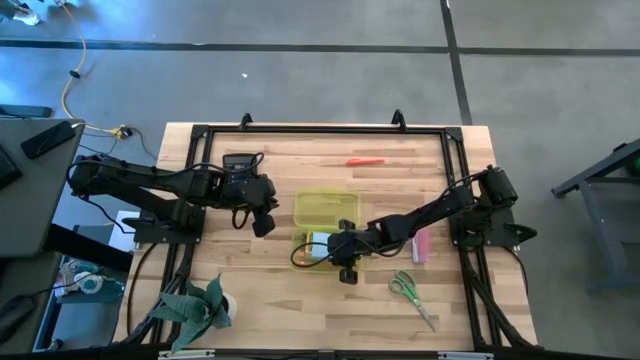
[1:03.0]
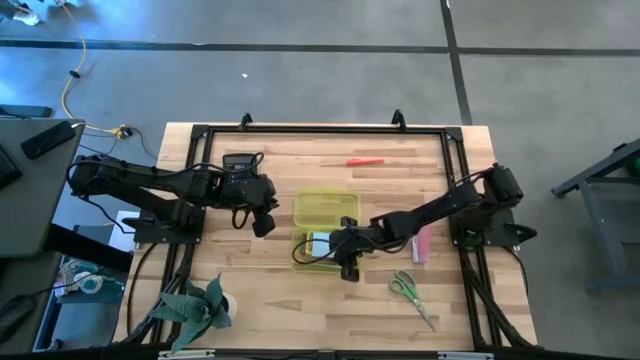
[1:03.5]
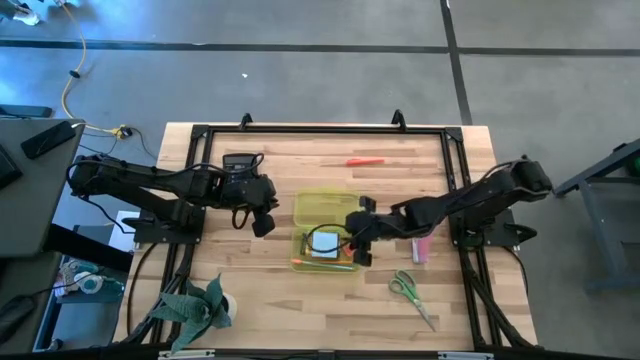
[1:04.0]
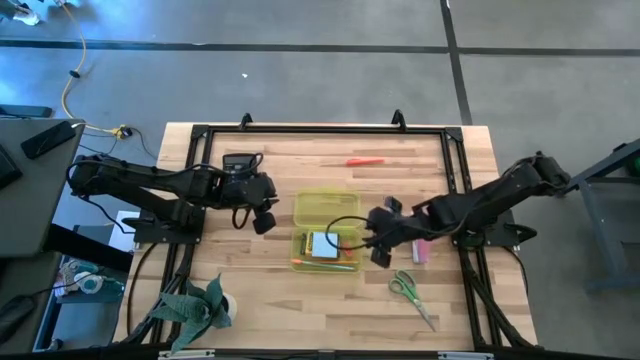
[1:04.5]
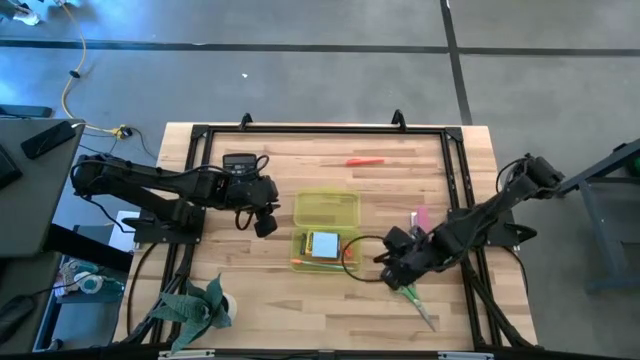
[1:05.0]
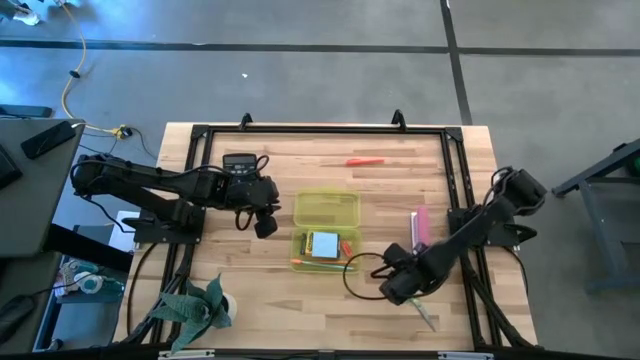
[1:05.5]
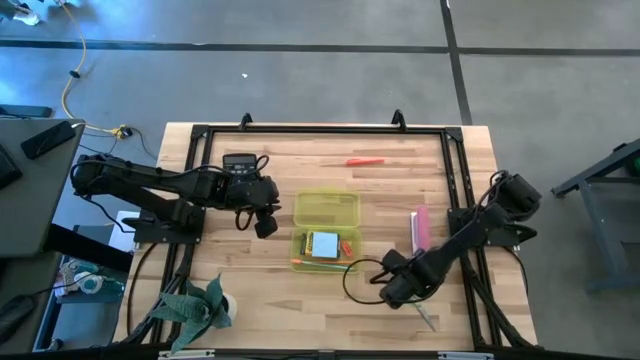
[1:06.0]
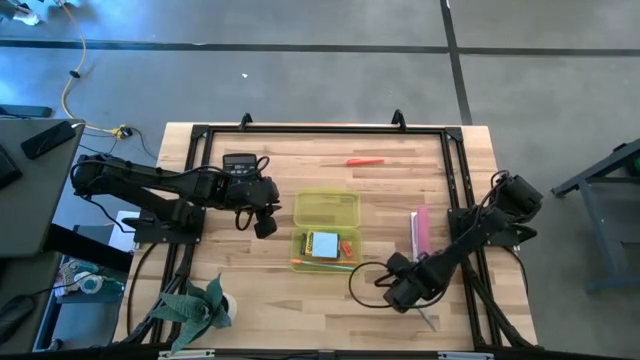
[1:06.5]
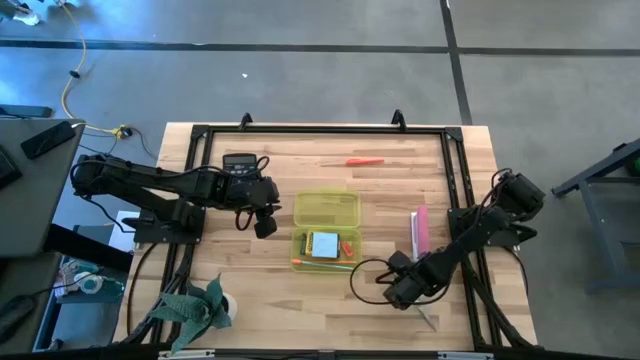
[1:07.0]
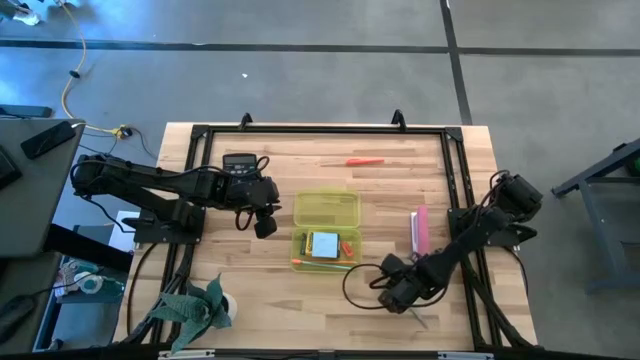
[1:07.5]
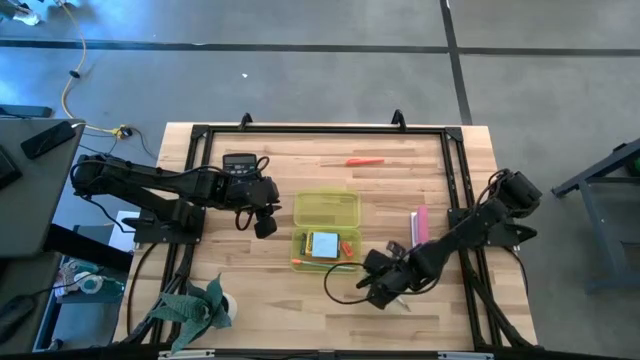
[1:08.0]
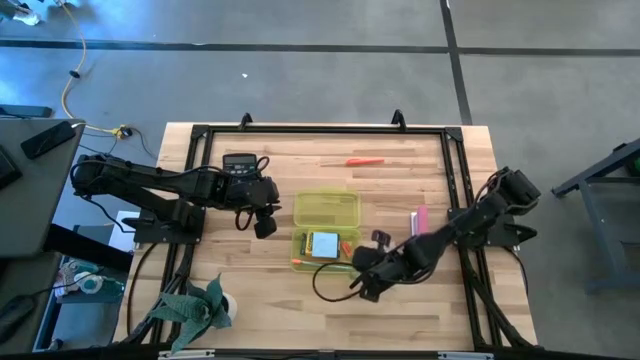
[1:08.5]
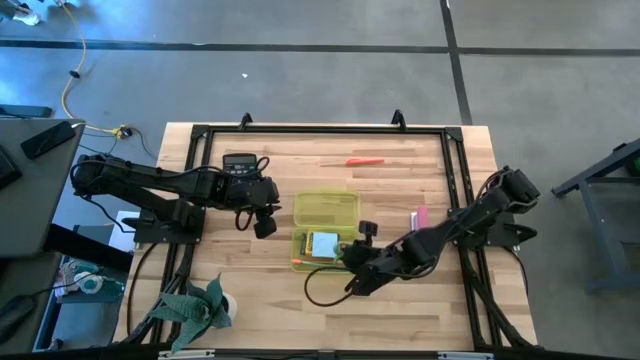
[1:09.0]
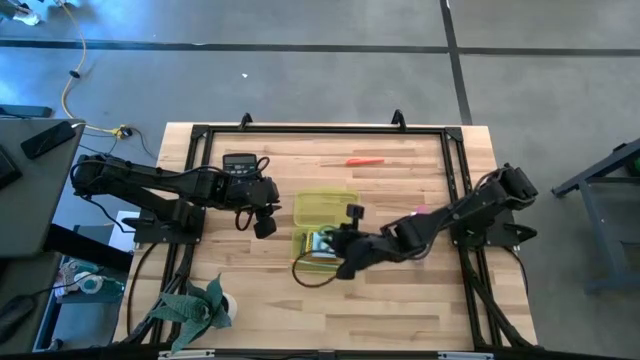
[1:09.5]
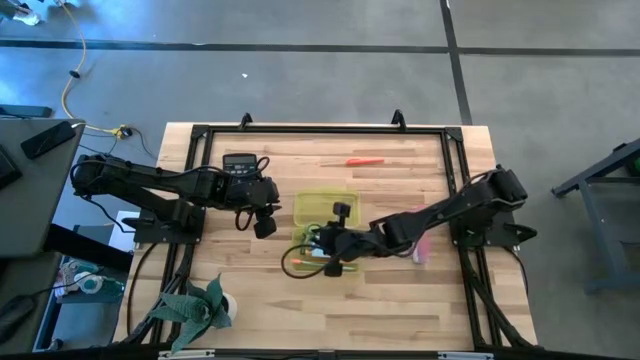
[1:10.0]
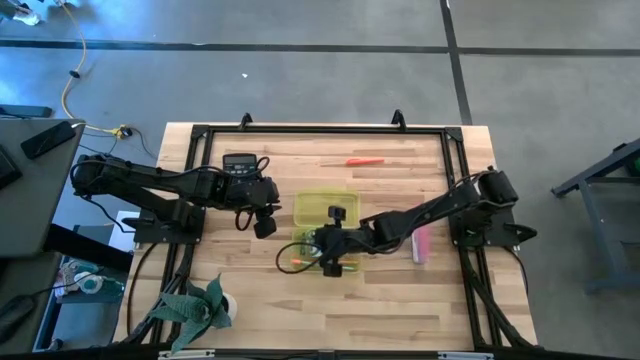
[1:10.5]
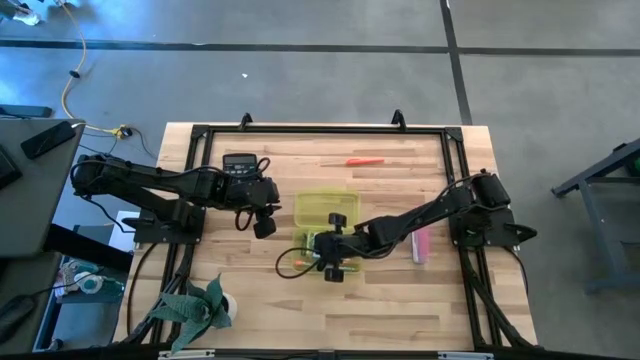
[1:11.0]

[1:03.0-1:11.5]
Task: Pack school essentials
Put the green scissors into the yellow supply box

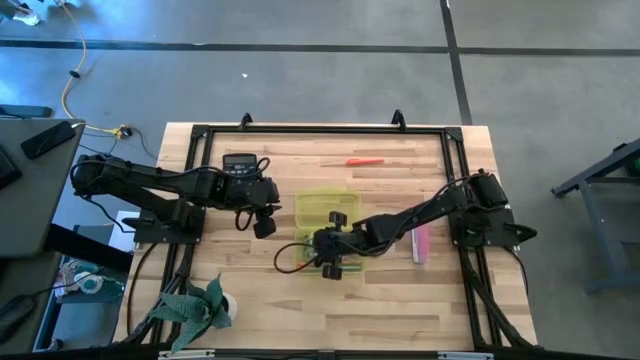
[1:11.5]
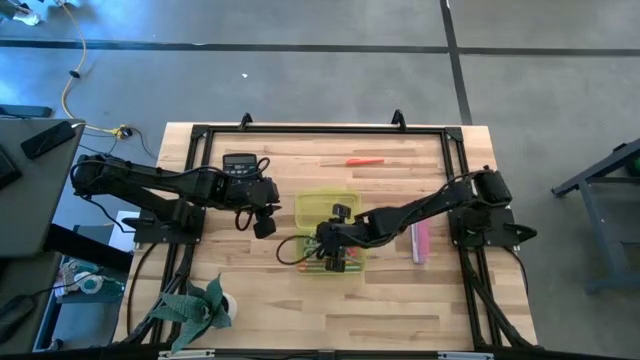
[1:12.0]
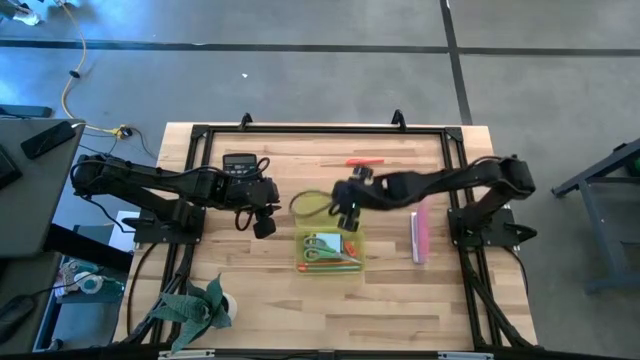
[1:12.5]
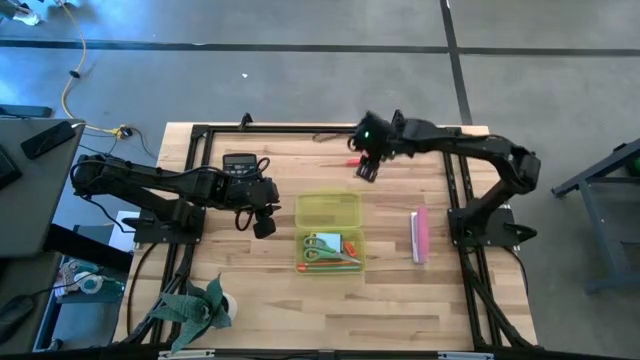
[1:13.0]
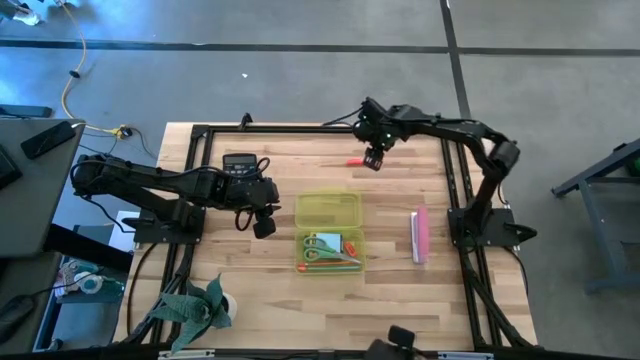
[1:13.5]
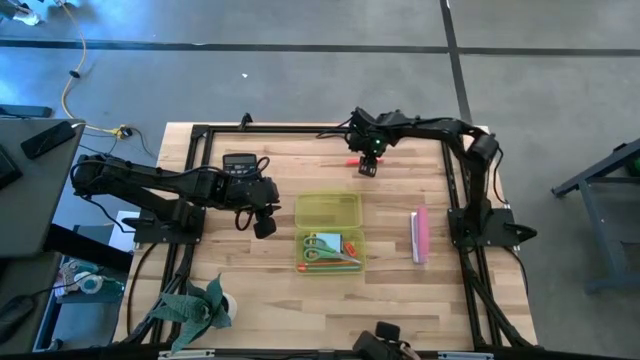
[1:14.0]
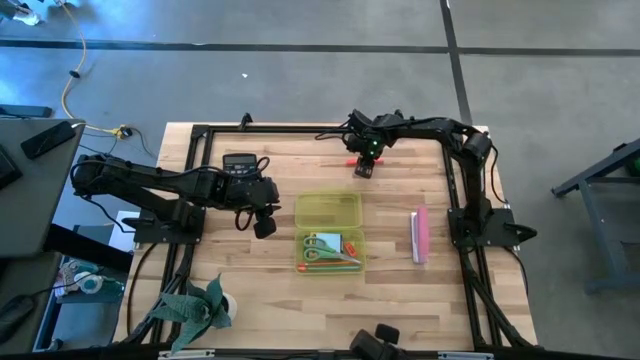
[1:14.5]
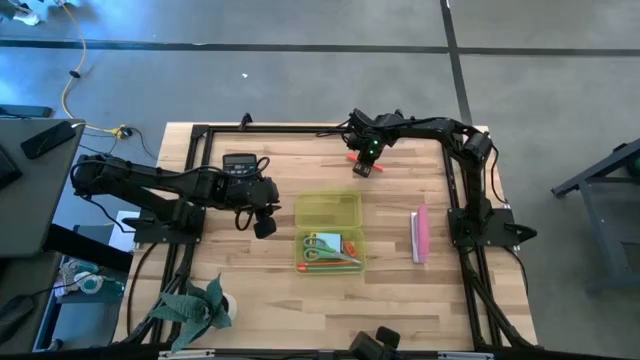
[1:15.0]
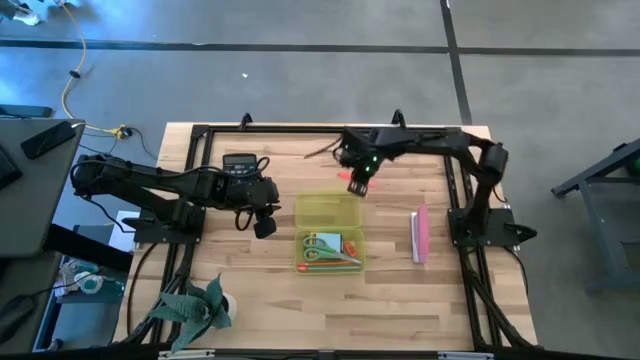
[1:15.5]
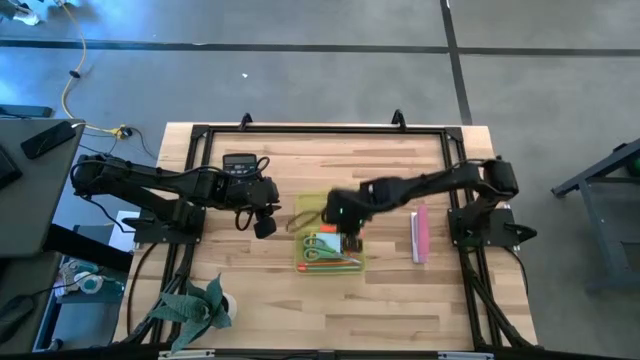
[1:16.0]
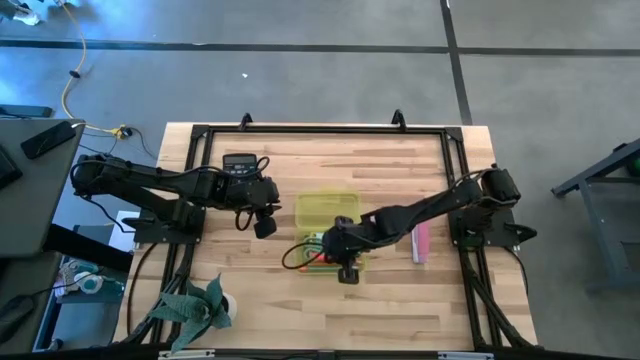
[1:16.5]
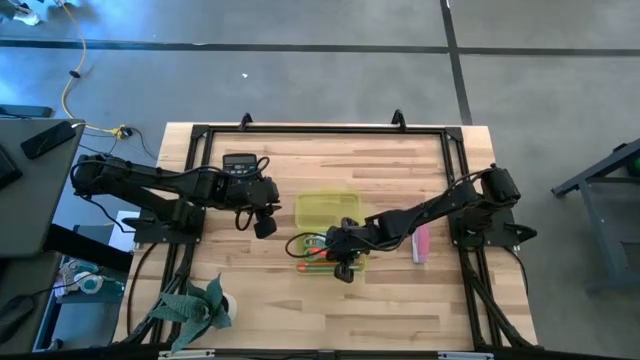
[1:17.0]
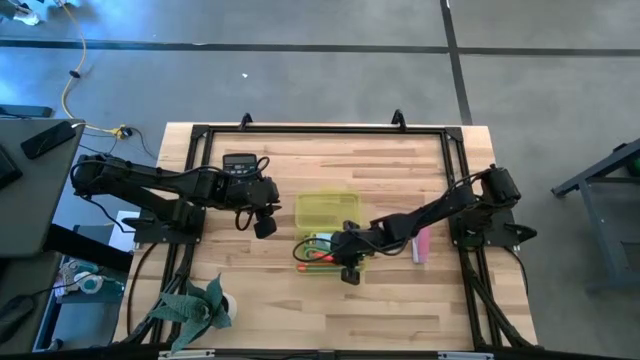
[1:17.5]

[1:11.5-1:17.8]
Put the orange pen into the yellow supply box

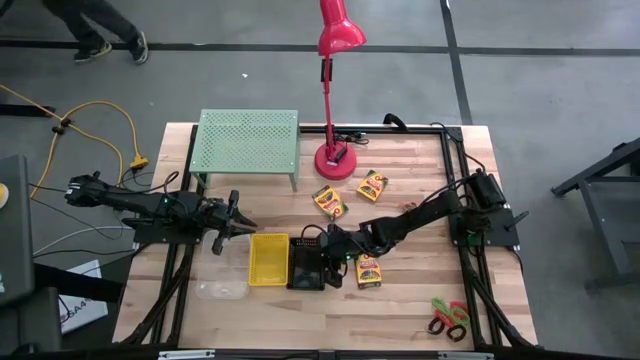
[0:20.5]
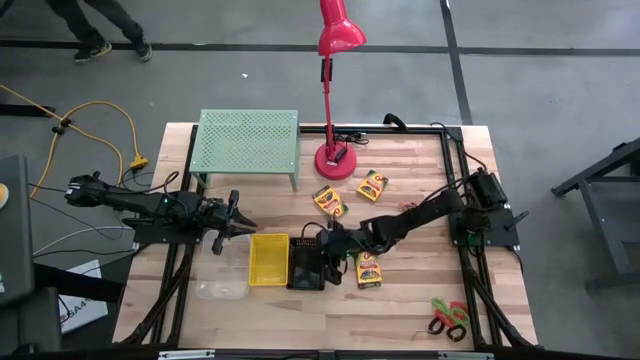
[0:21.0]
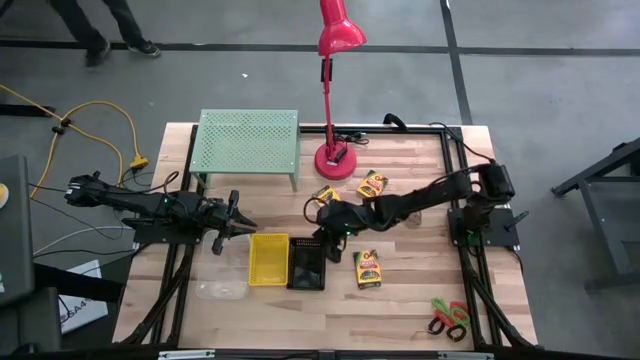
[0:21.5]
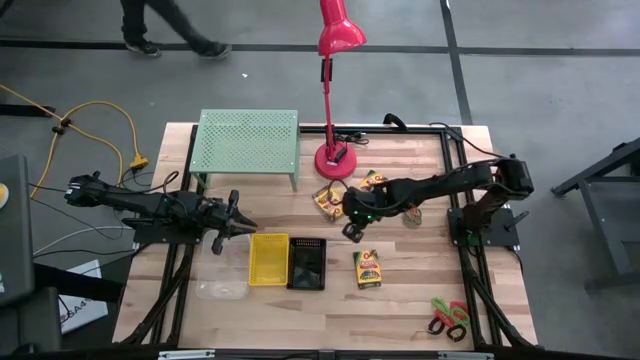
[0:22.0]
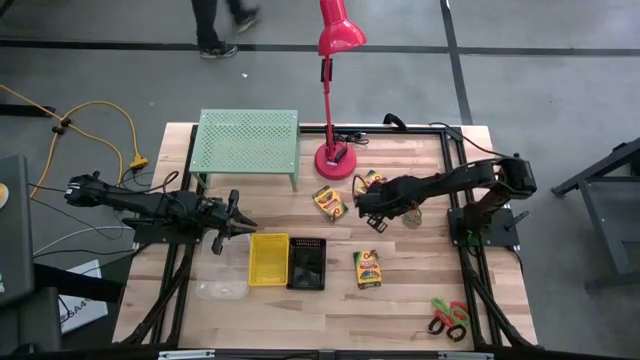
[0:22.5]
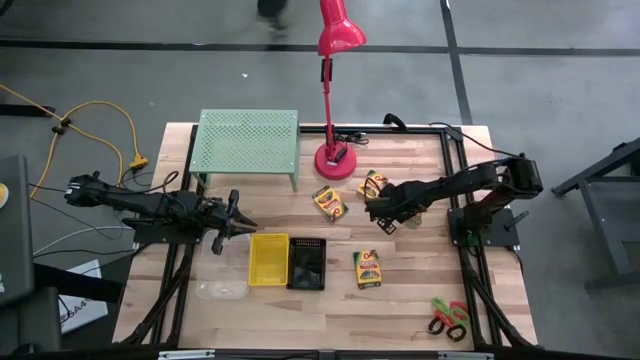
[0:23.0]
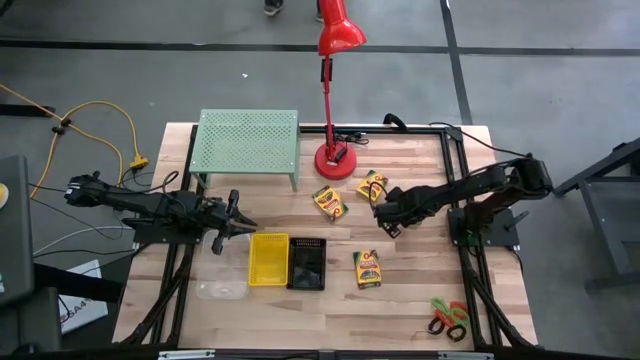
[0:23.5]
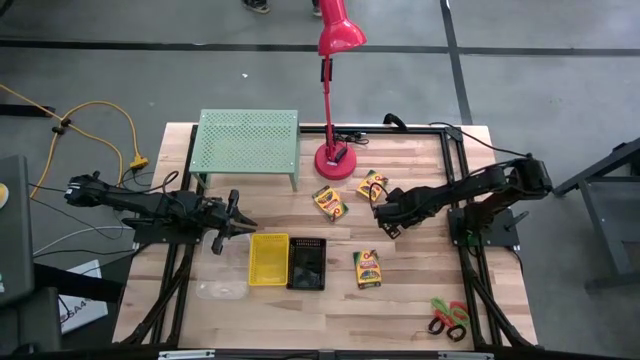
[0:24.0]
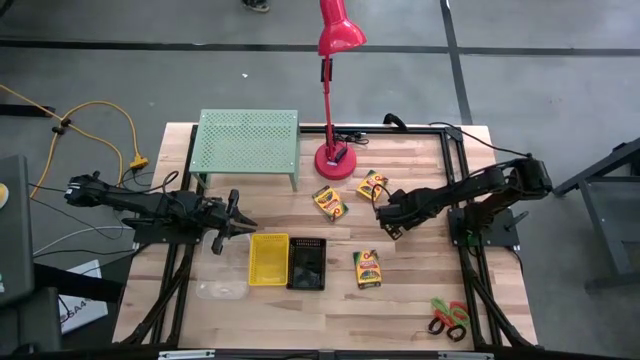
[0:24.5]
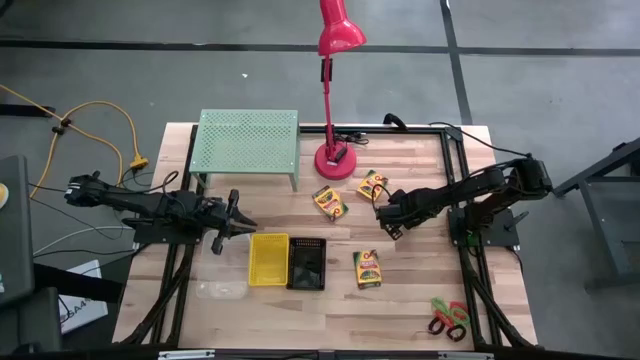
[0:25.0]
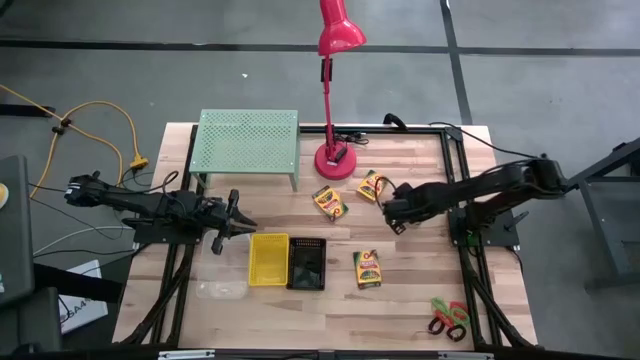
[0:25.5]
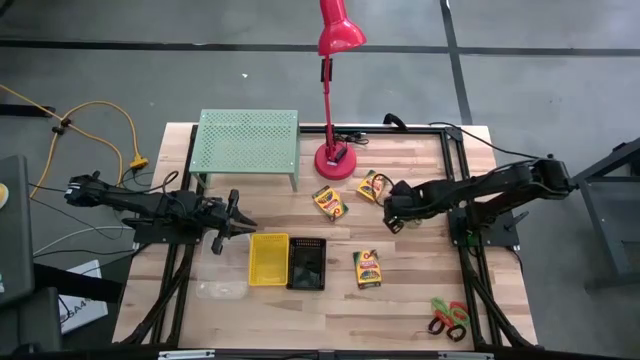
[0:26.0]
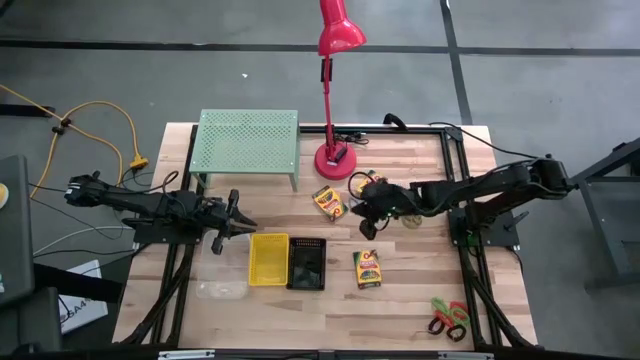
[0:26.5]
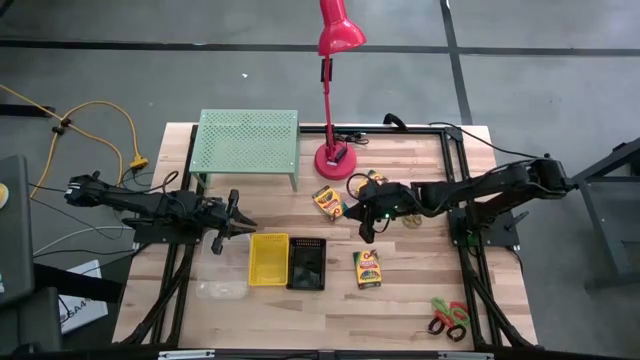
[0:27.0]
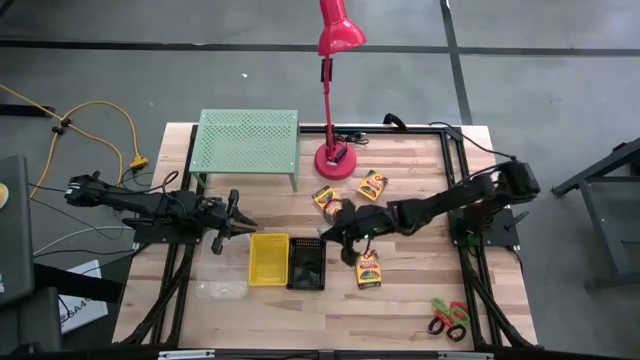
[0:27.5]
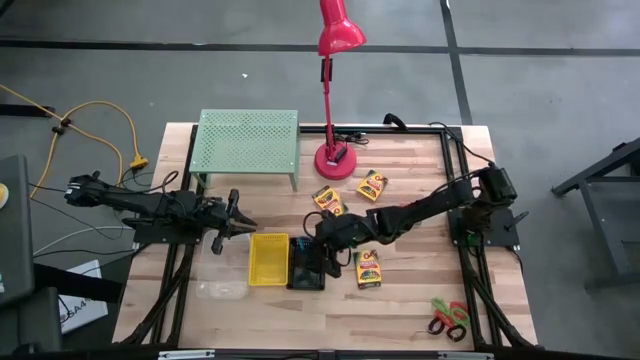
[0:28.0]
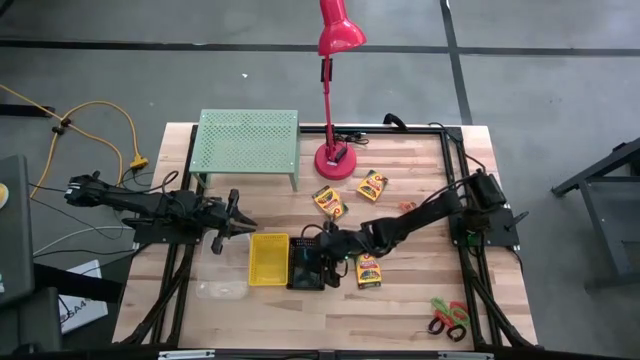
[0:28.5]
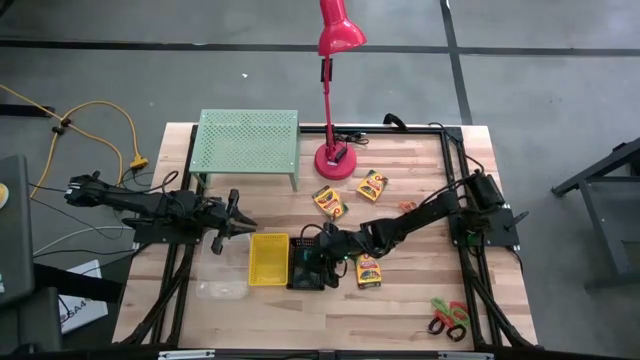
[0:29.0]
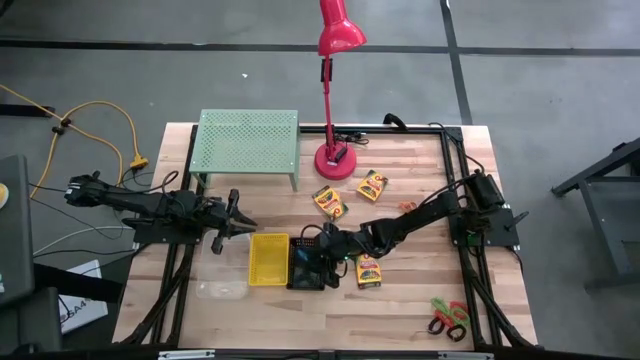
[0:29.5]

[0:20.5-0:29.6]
Task: Pick & Place Office Desk Supplies
Put the blue rubber band into the black rubber band
